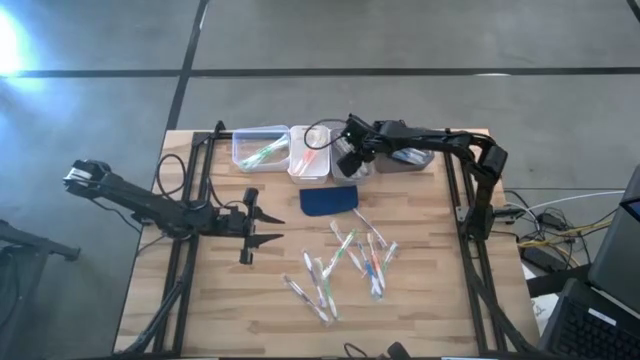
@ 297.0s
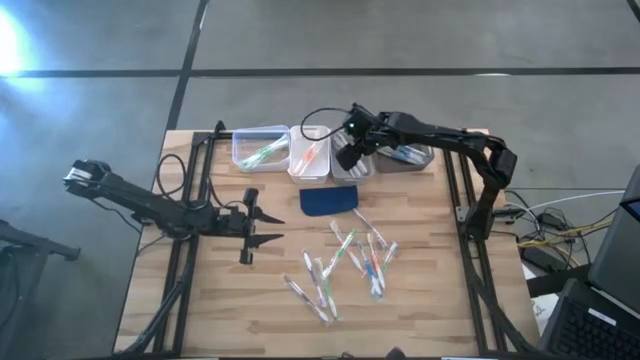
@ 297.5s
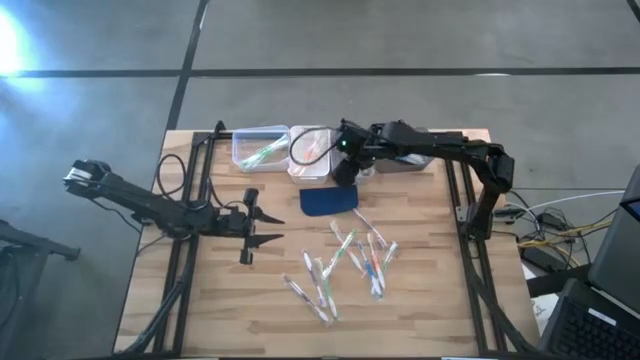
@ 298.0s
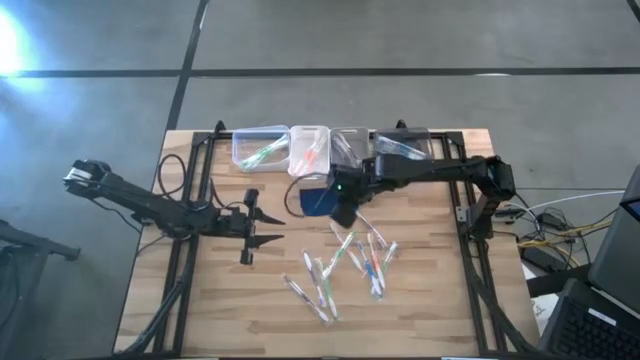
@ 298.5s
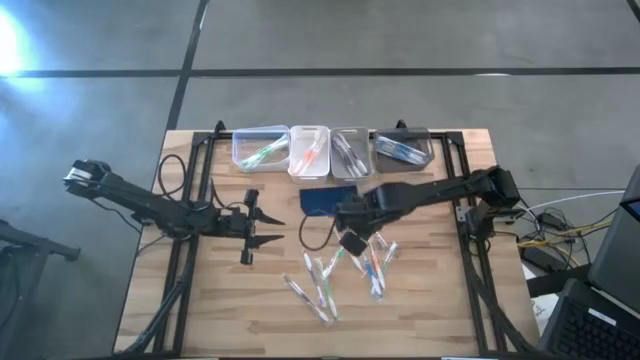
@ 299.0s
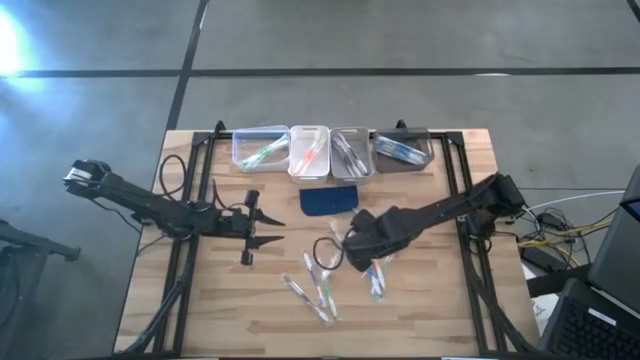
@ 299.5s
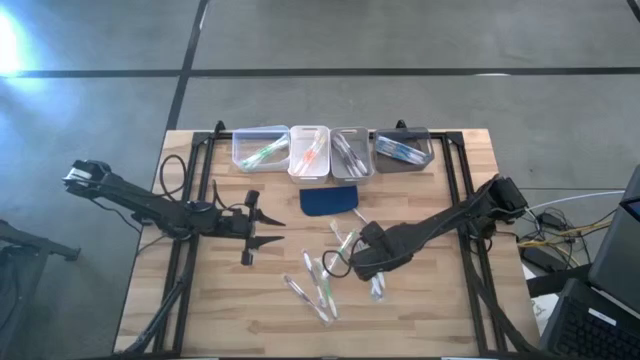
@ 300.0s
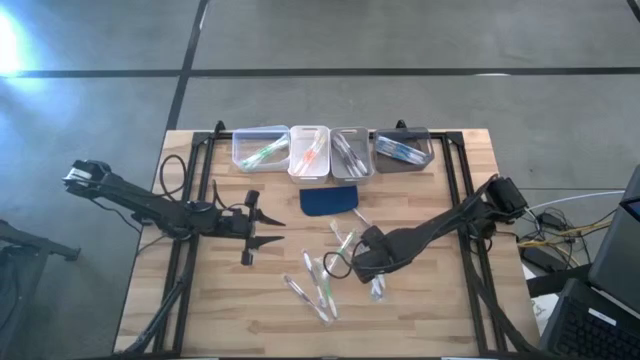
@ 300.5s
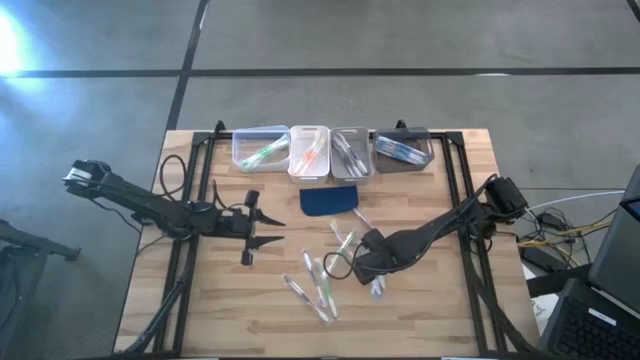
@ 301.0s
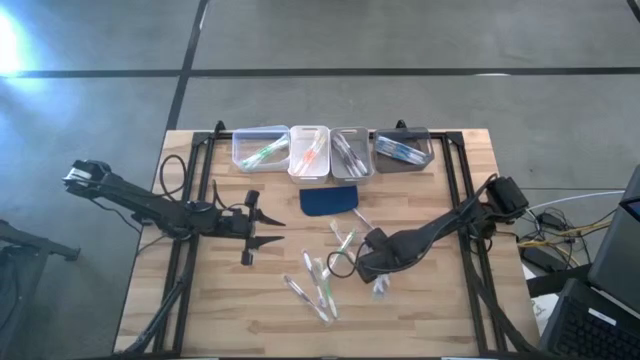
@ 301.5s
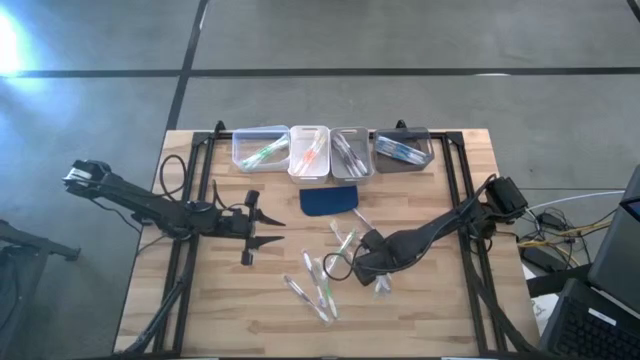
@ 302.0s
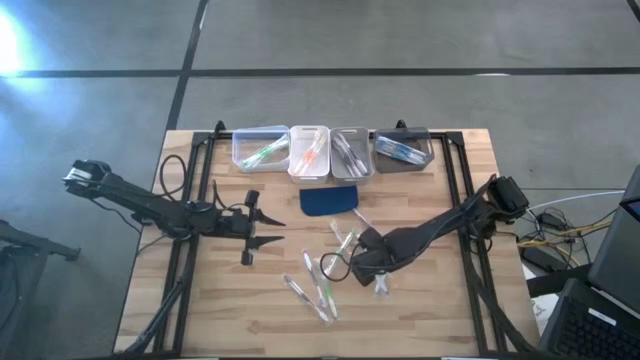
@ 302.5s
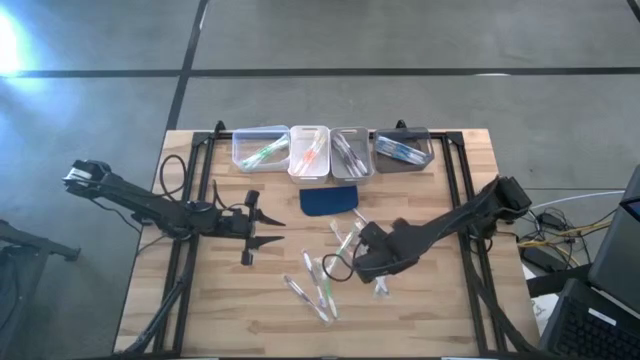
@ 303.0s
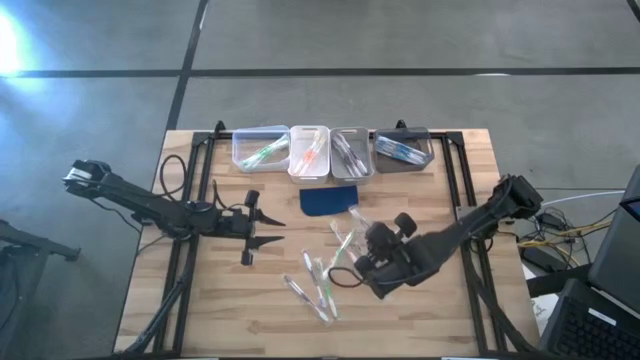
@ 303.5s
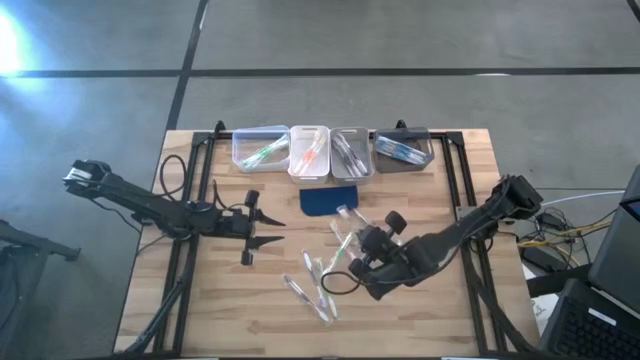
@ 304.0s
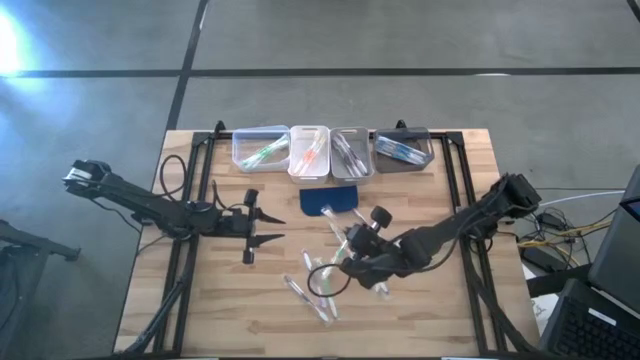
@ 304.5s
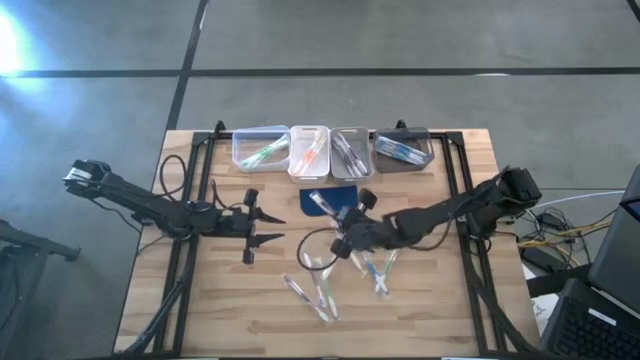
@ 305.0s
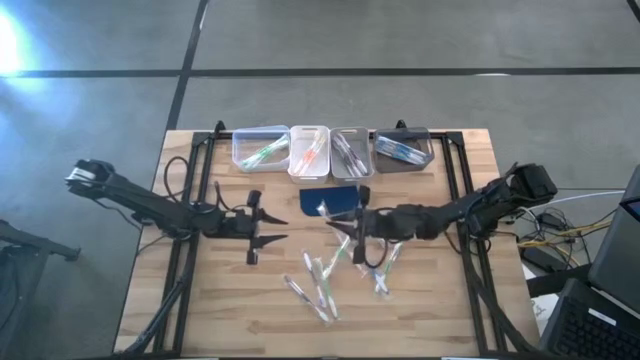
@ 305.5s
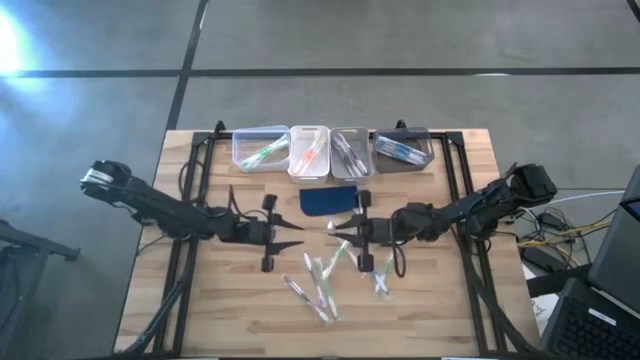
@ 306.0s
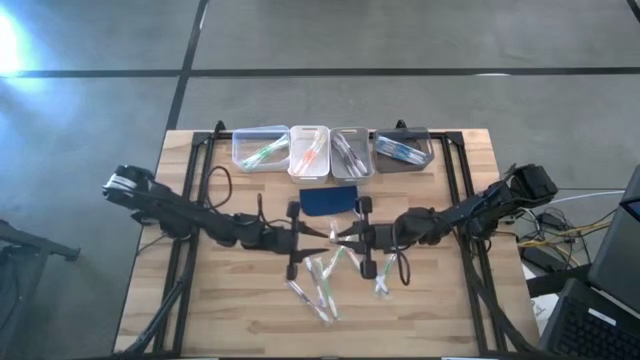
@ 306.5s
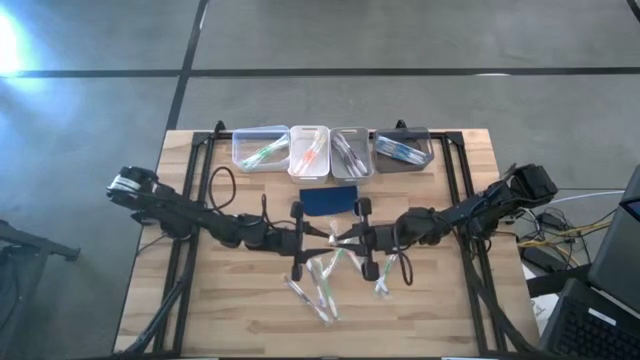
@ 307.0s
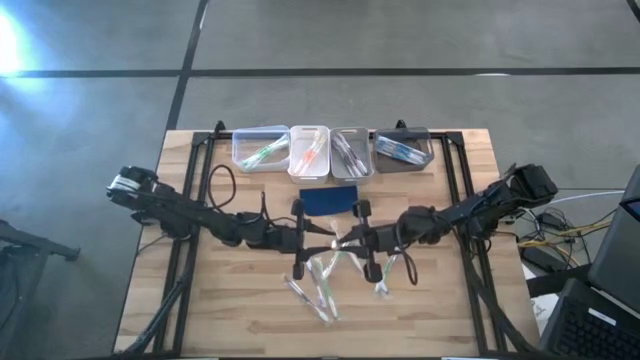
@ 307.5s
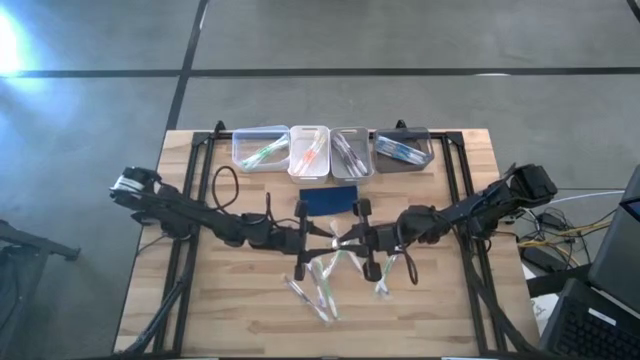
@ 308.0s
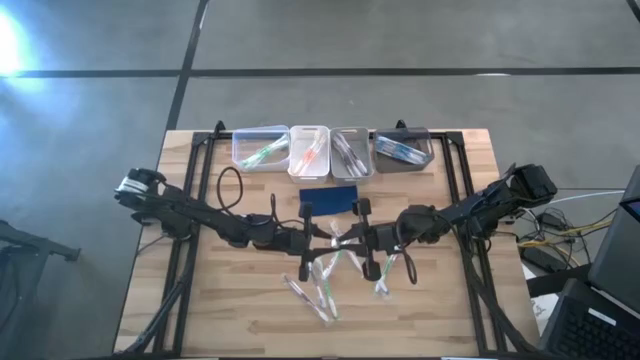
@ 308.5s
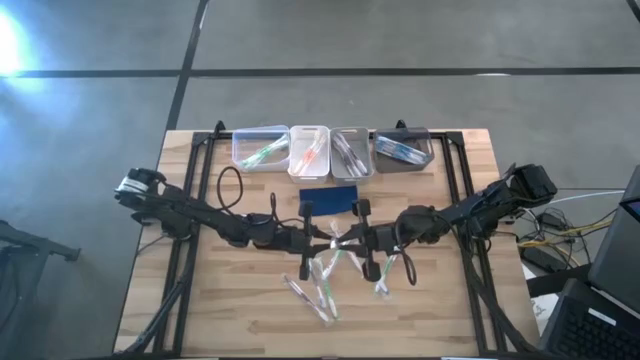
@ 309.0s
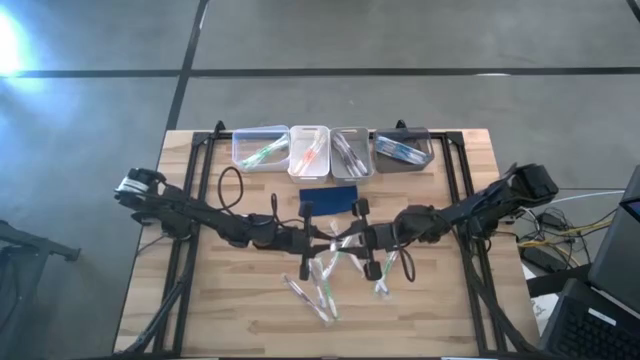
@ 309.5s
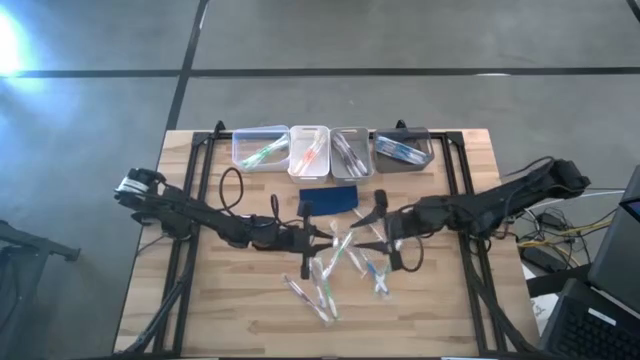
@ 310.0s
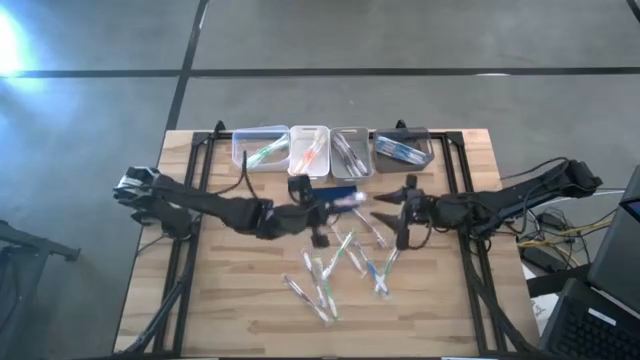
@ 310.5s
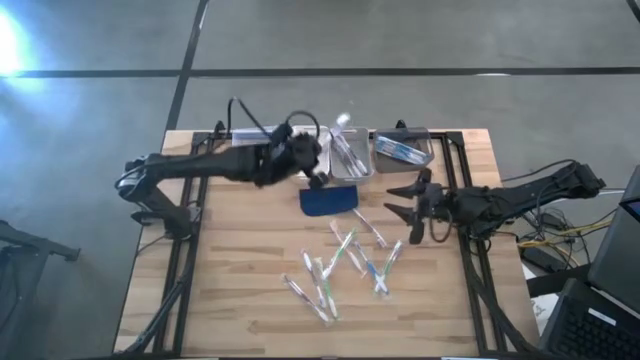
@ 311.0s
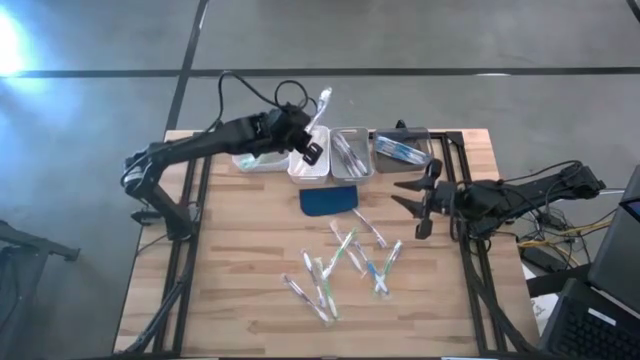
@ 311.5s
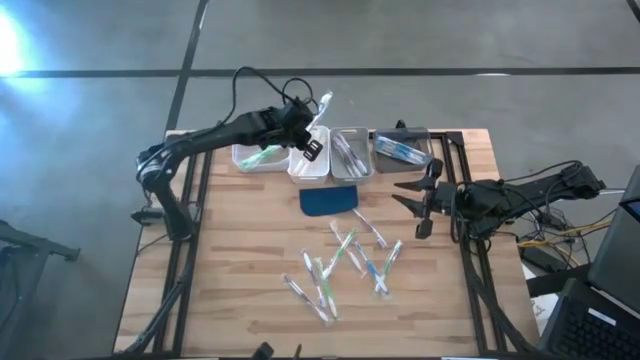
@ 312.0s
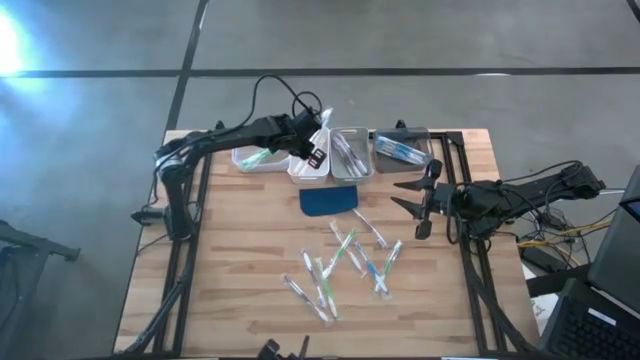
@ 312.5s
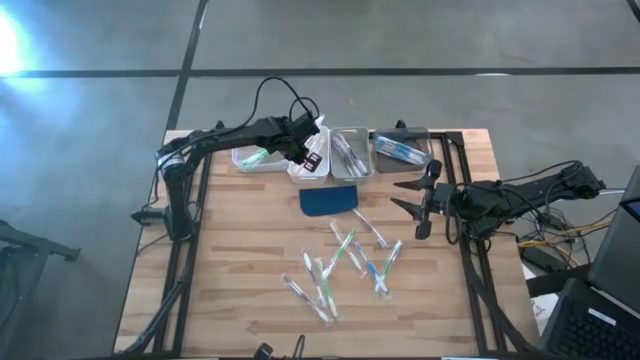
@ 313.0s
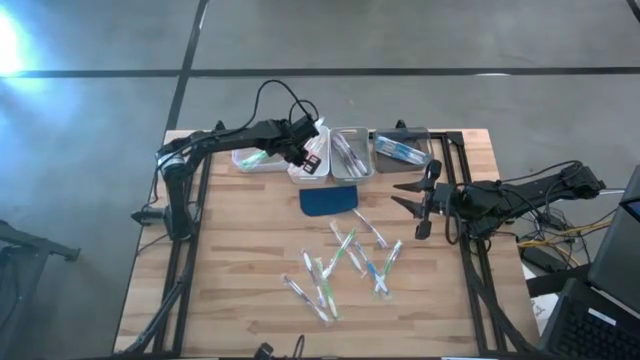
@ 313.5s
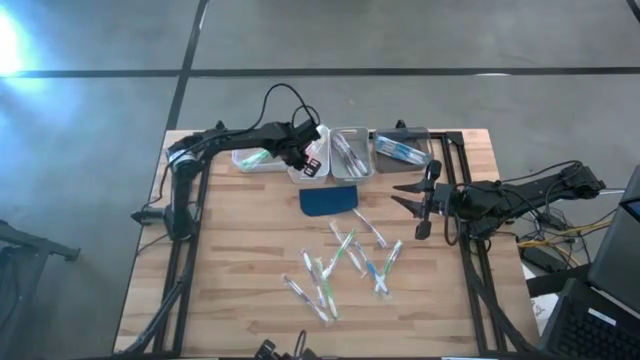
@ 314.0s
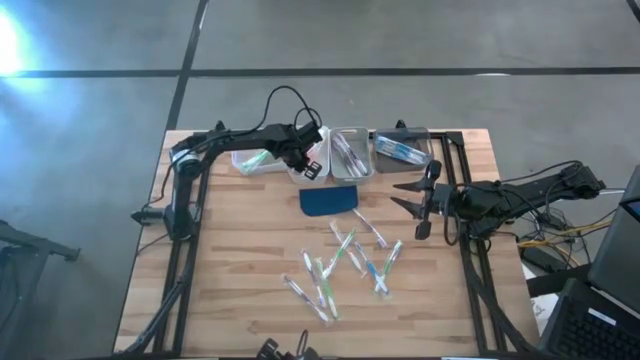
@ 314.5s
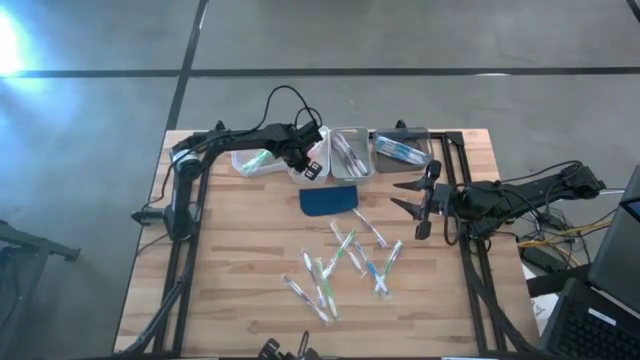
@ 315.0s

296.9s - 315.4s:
Task: Pick & Place Toothbrushes
Put the orange toothbrush into the white bin

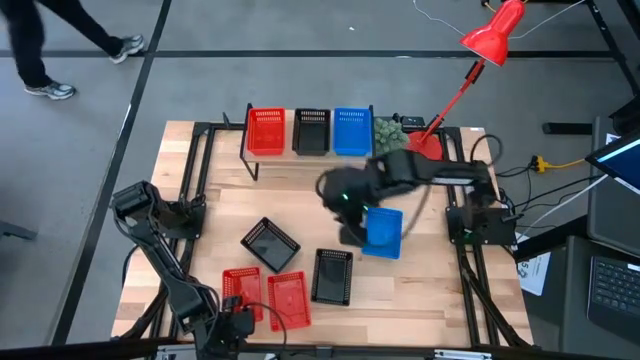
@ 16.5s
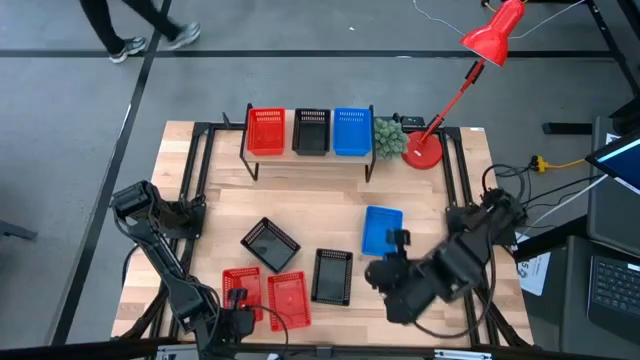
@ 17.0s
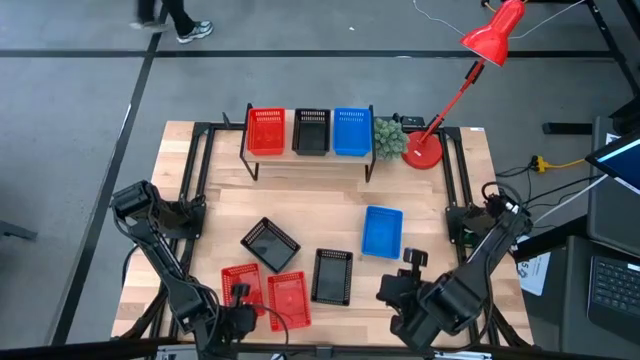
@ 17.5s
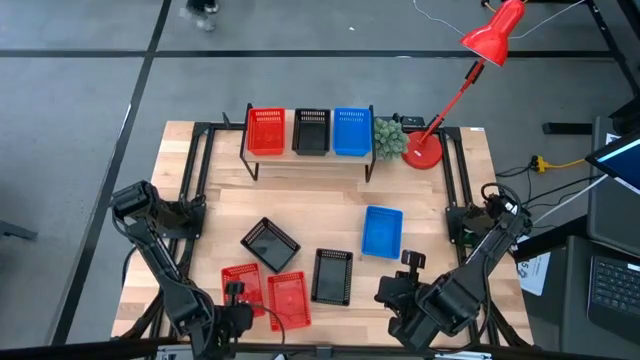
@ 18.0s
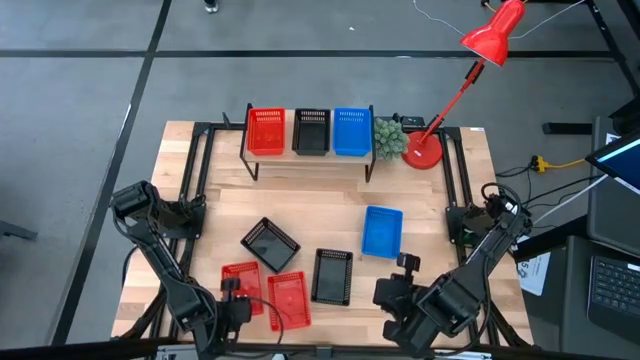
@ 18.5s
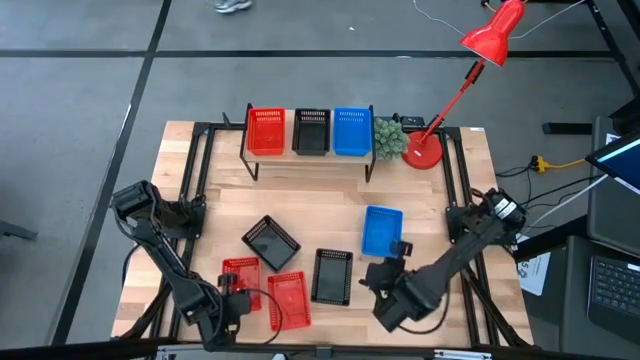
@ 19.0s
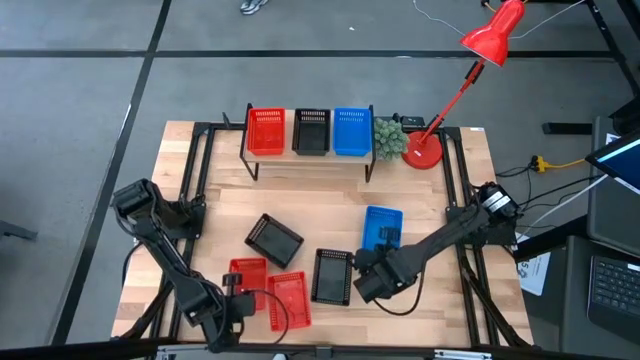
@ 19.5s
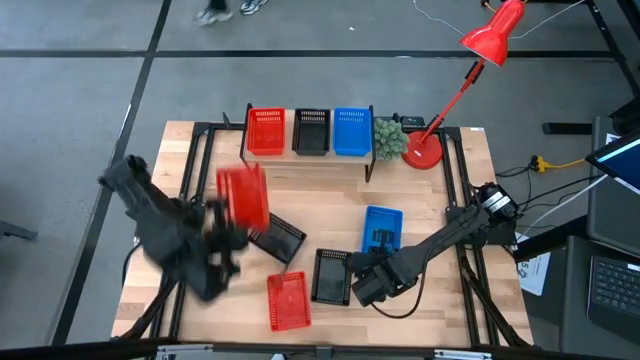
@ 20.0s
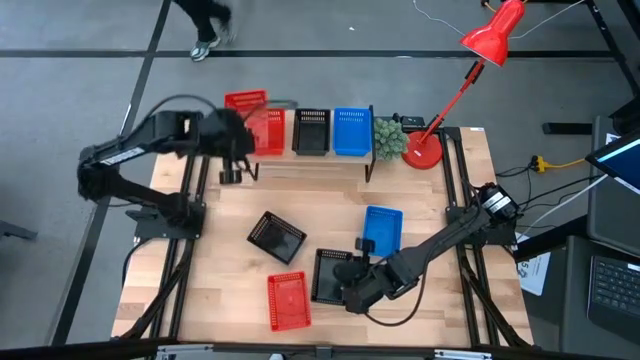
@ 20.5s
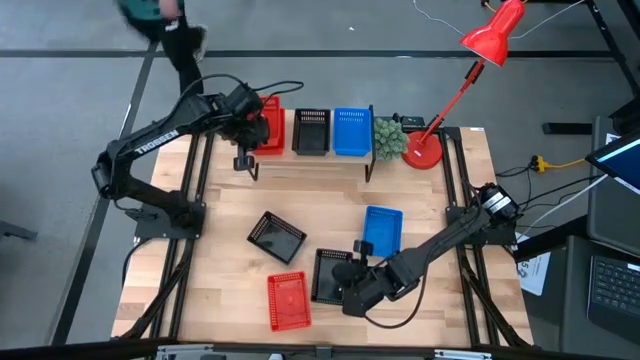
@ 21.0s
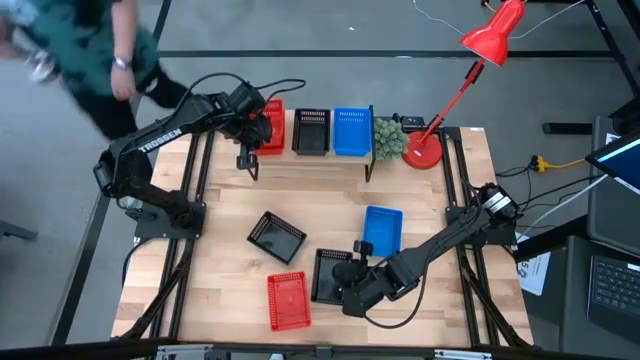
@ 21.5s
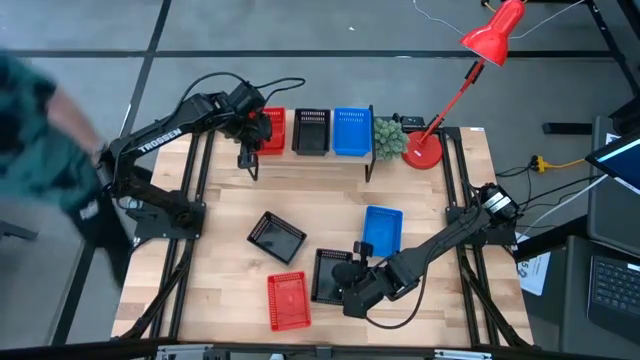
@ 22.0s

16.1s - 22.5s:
Task: Stack baskets on shelf by color
Stack the left red bin on top of the red bin on the shelf
